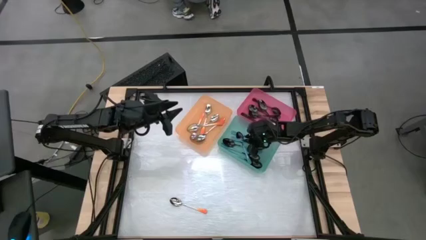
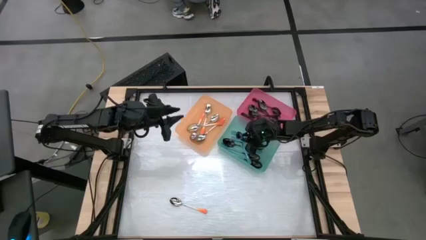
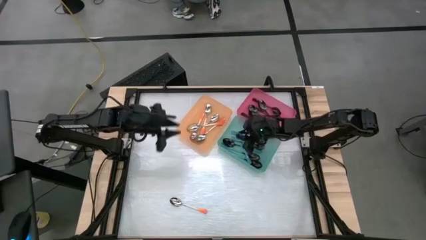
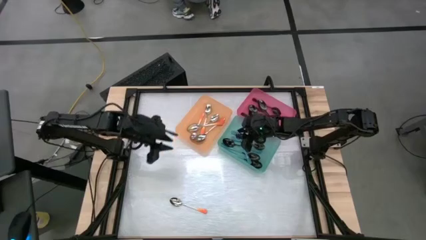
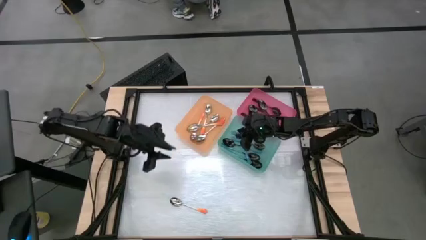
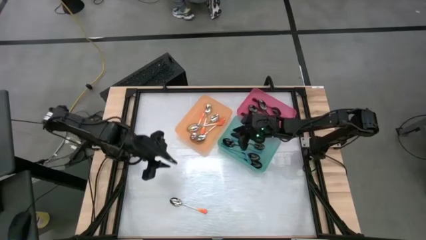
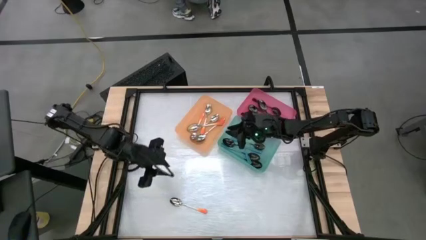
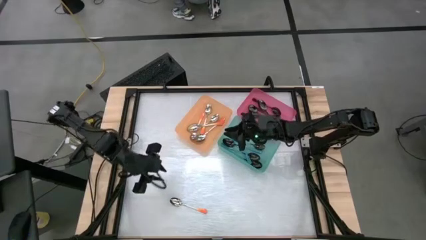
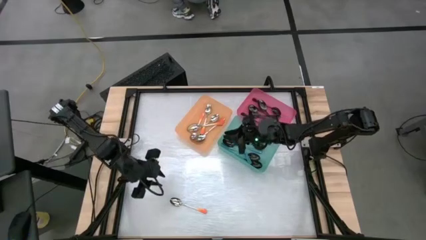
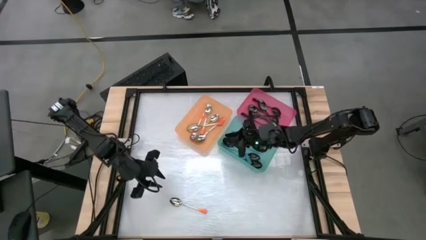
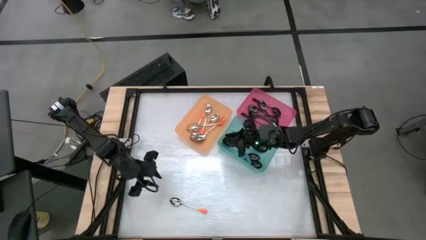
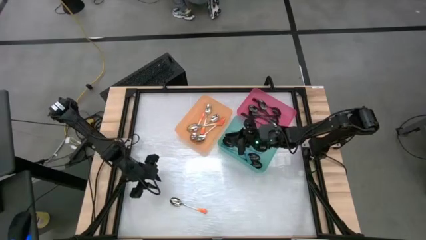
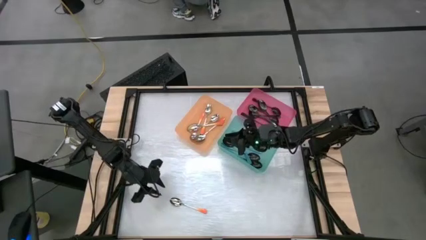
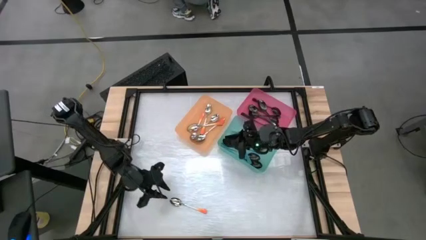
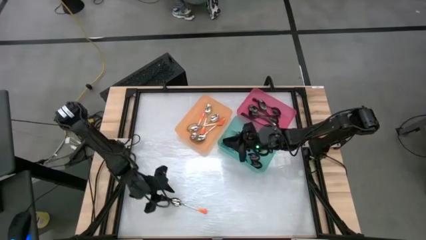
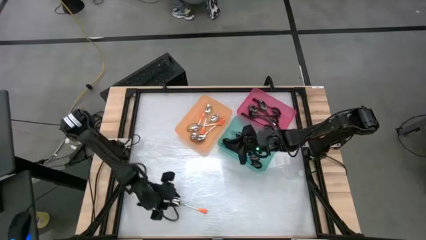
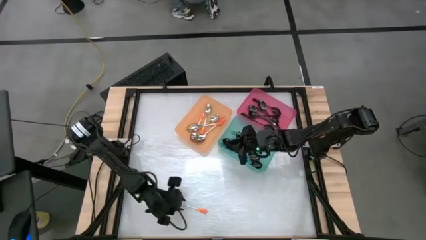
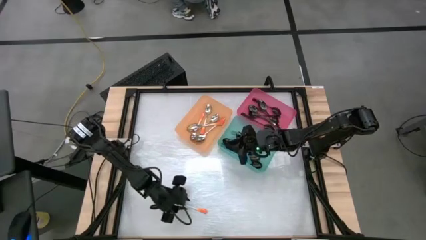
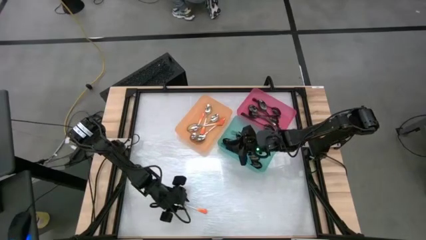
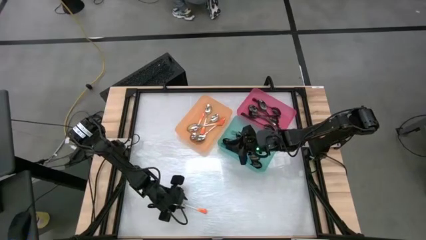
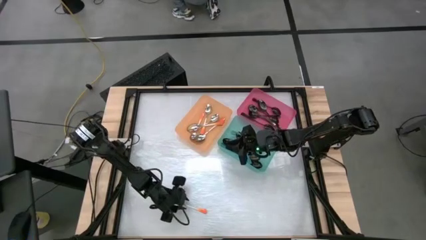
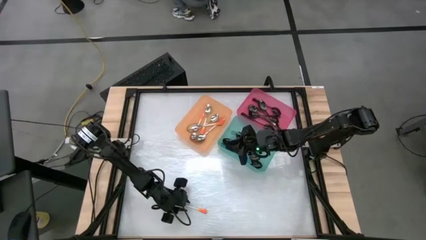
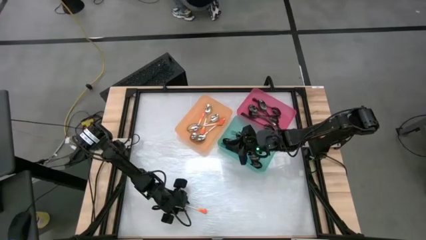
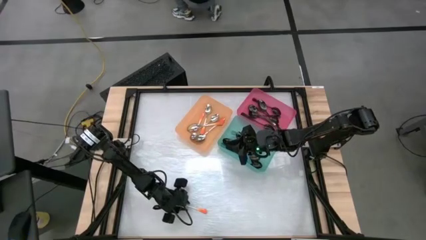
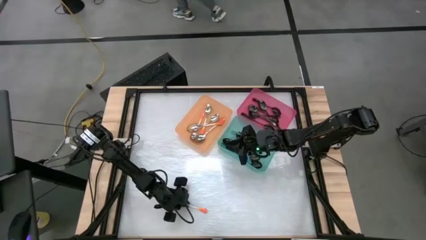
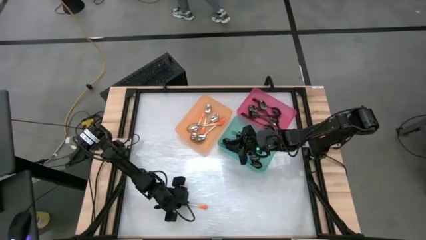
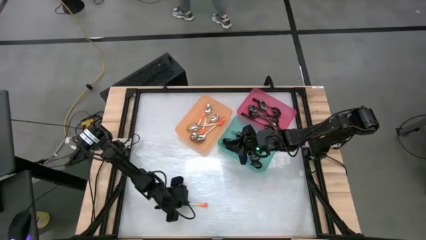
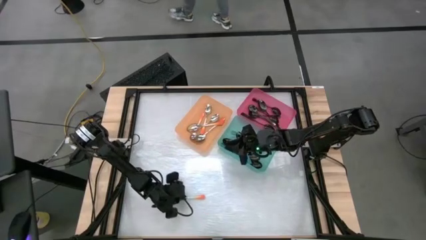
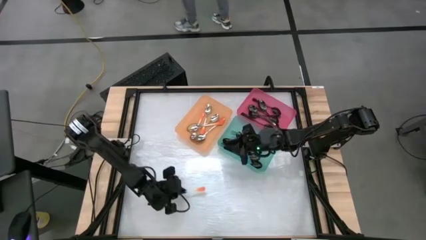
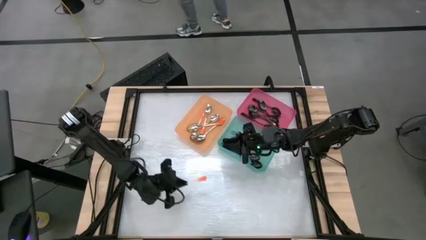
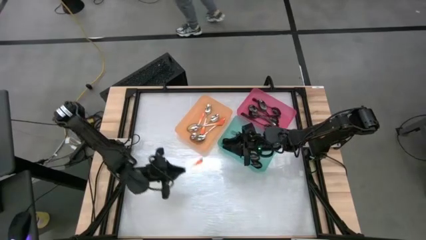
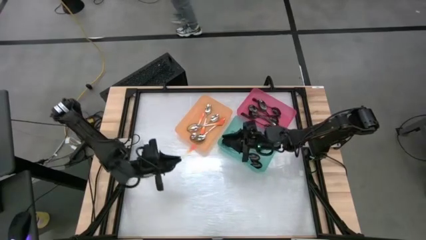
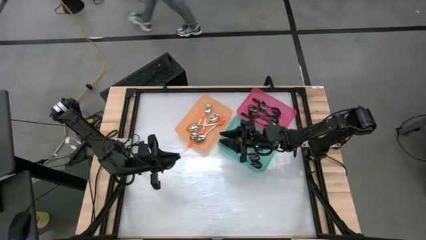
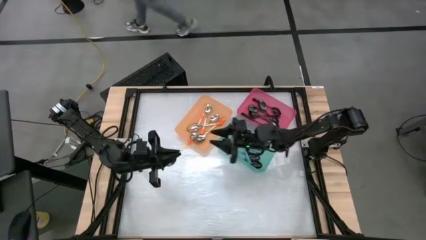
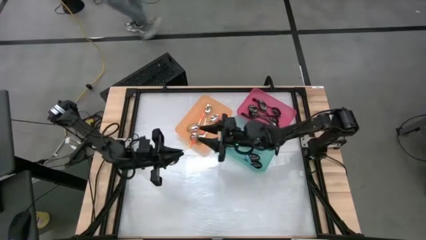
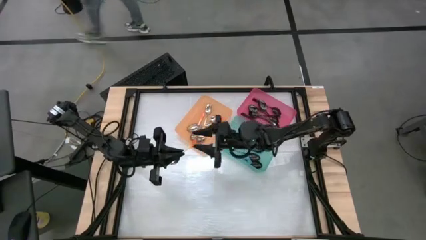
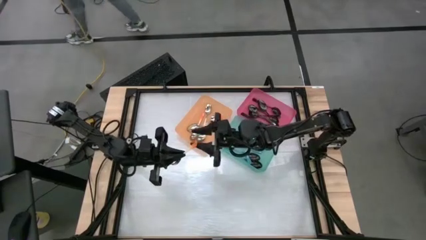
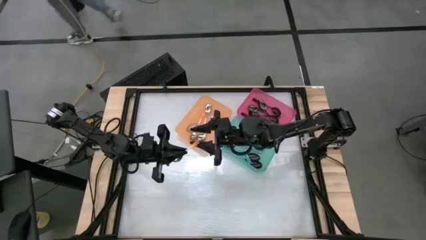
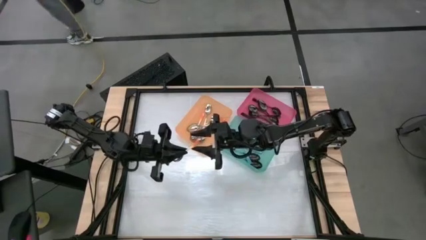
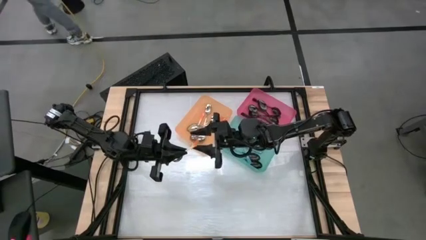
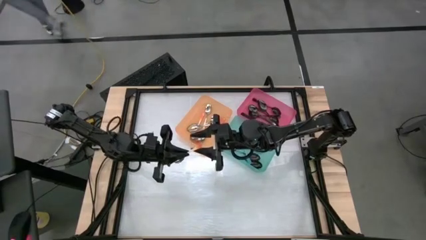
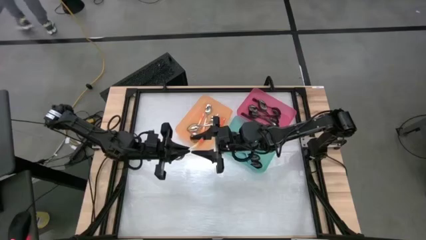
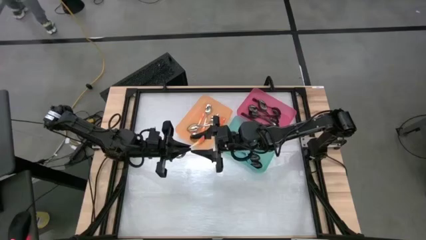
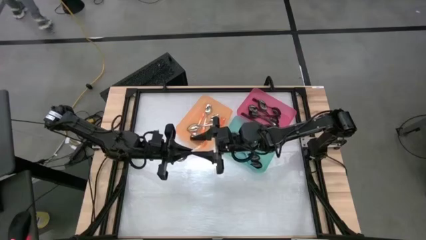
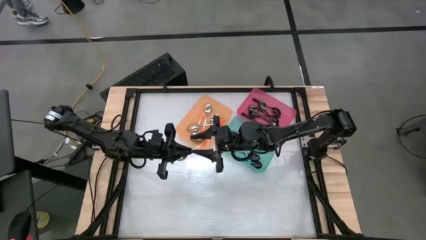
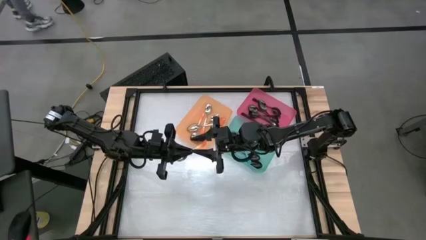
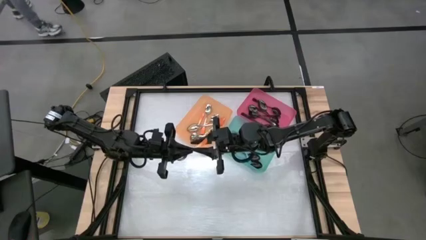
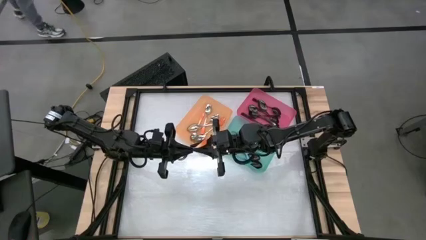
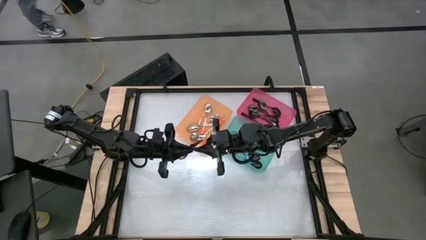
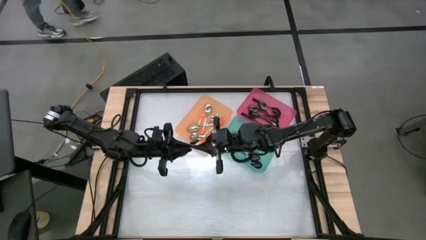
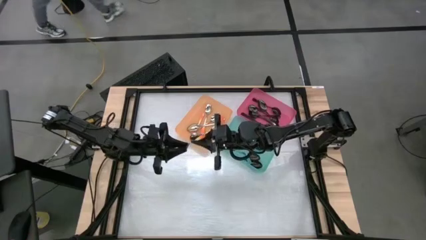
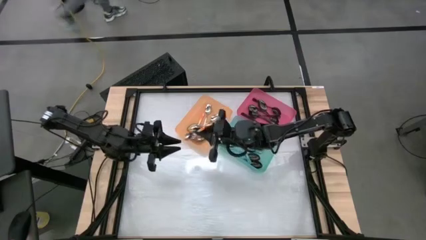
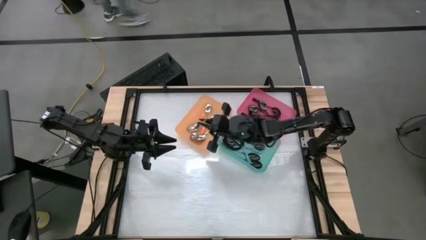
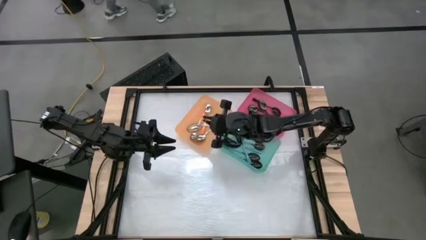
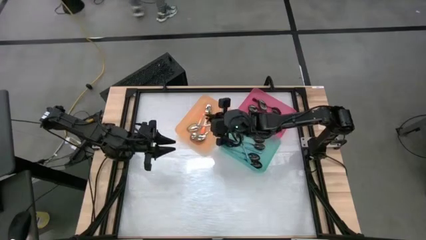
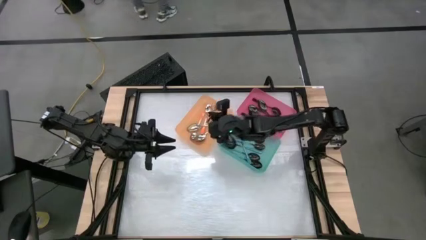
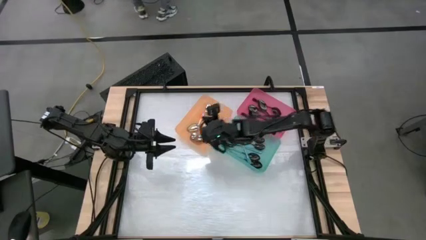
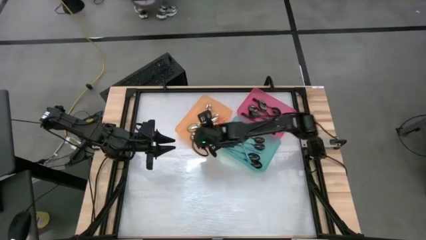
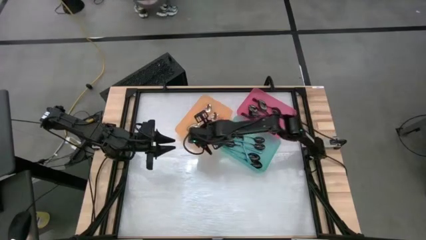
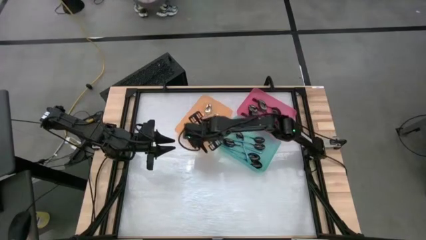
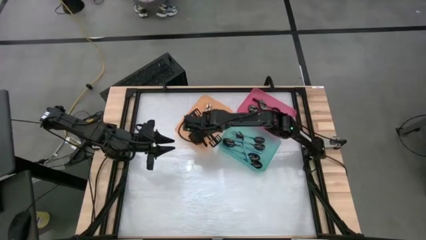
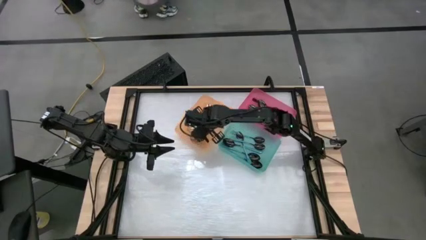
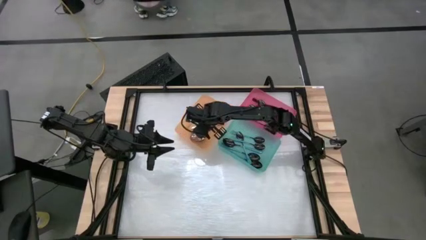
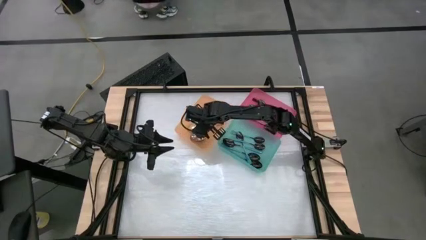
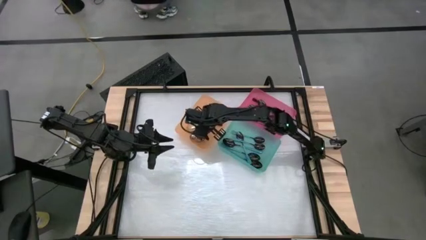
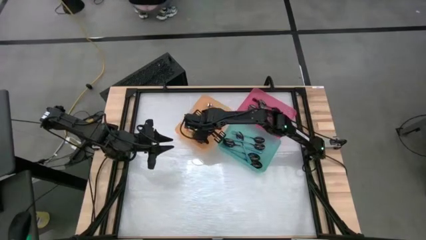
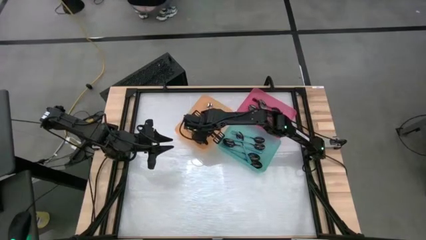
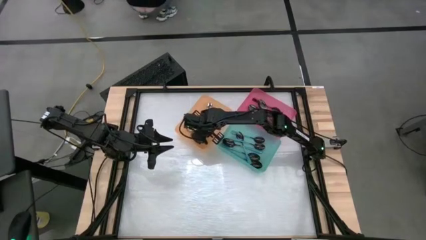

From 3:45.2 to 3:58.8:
Task: Sort silverware by color (type)
Put the orange spoon into the orange bin
